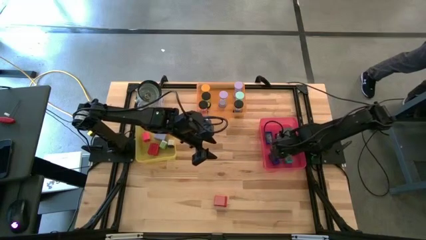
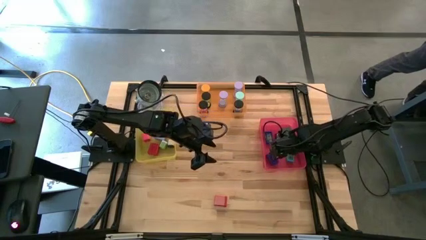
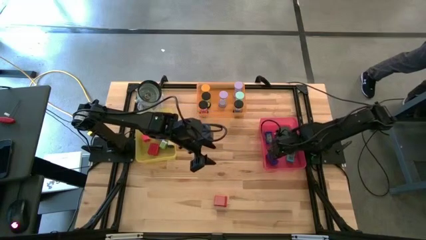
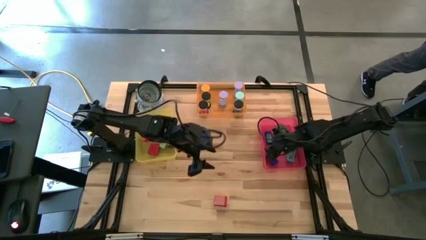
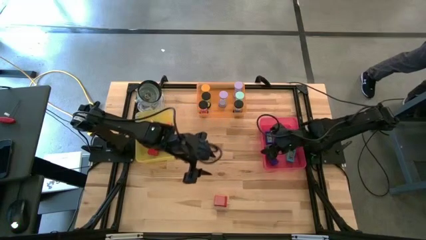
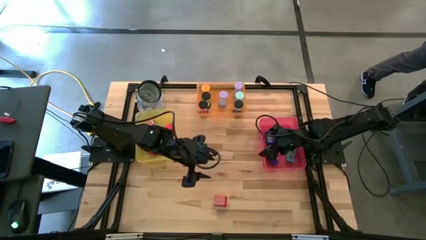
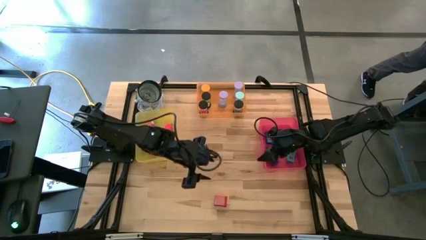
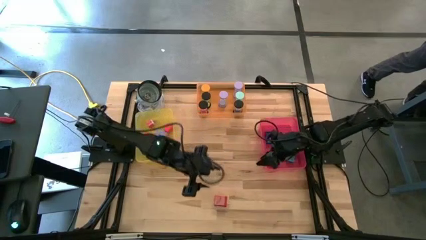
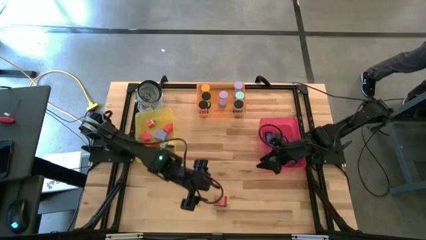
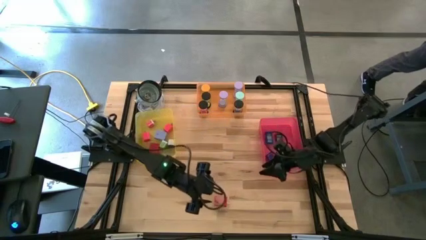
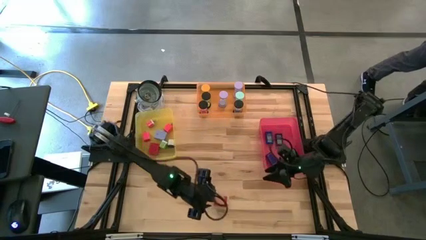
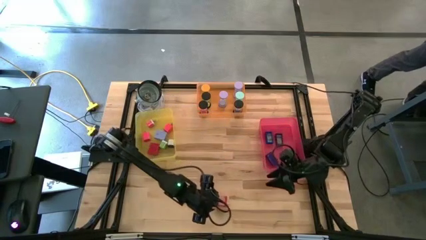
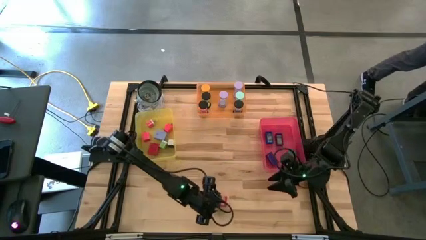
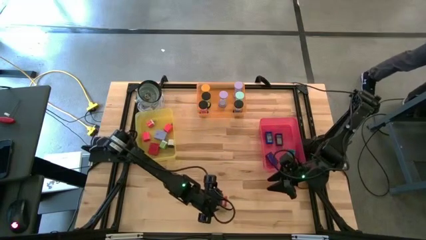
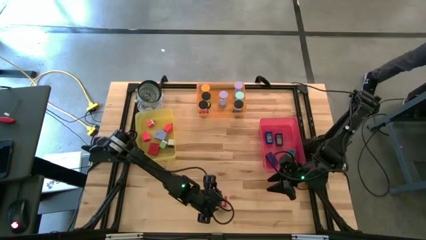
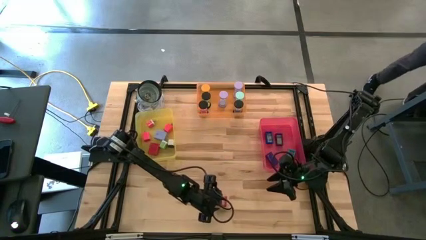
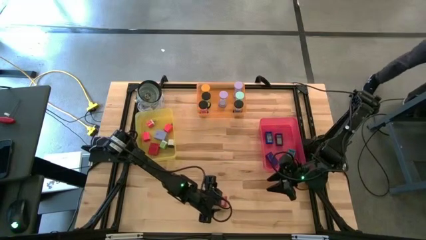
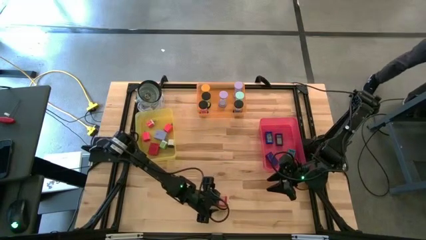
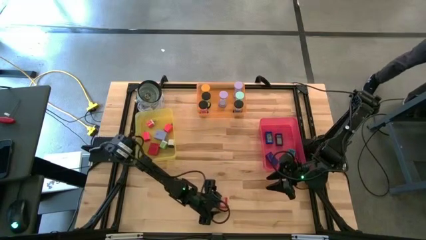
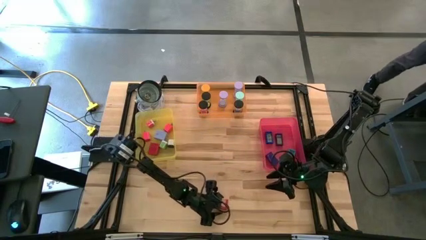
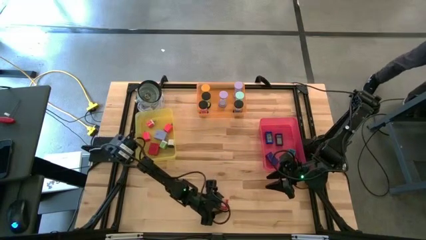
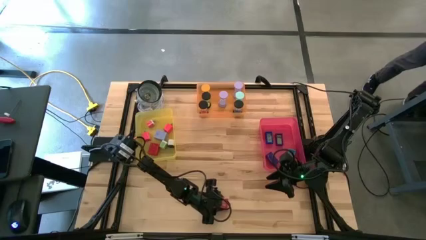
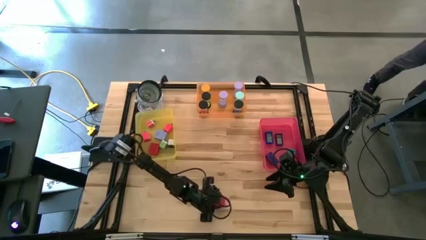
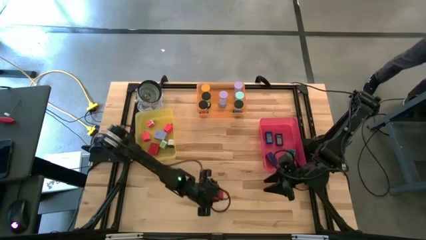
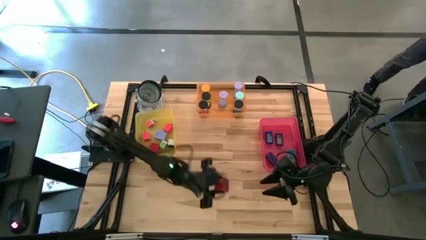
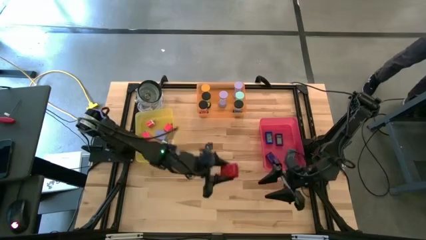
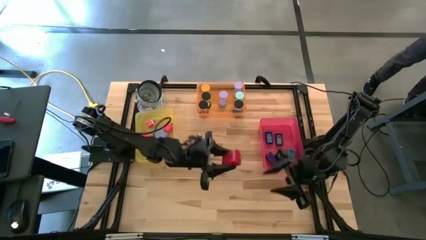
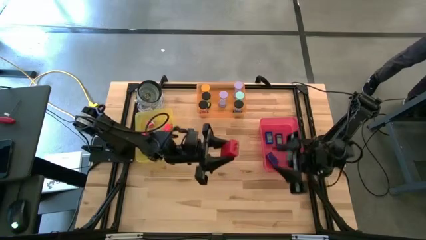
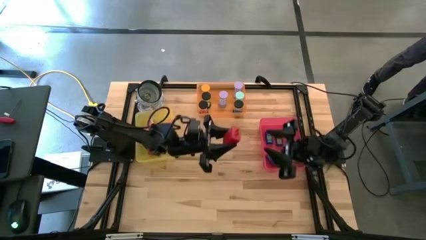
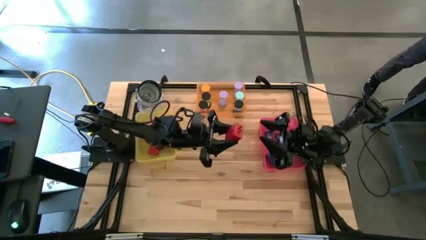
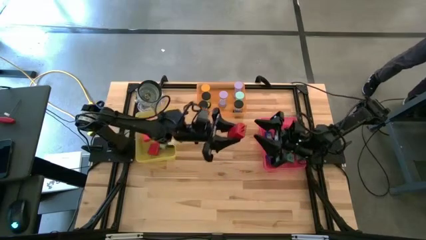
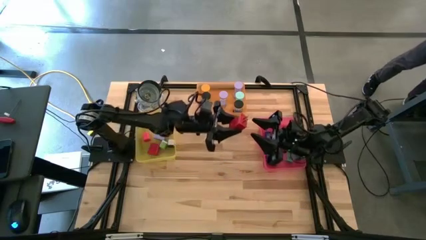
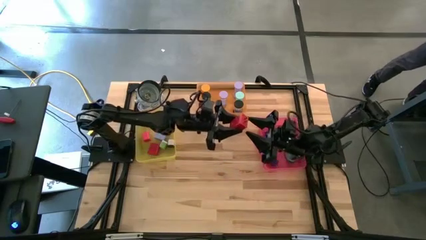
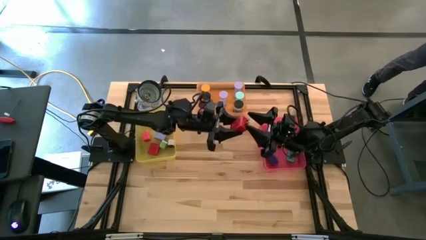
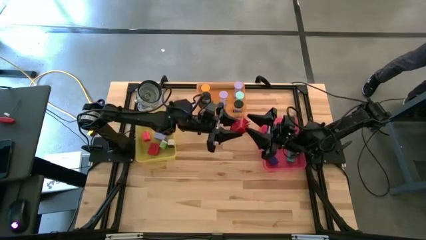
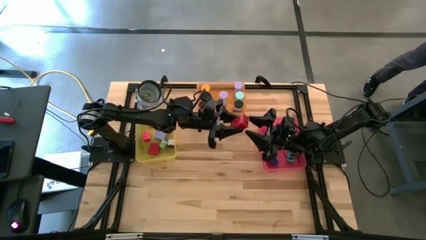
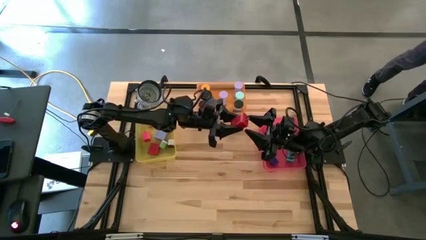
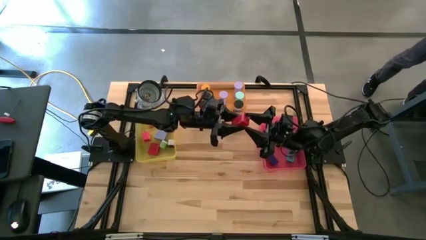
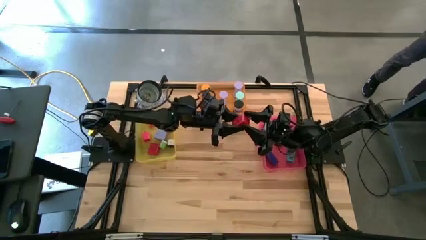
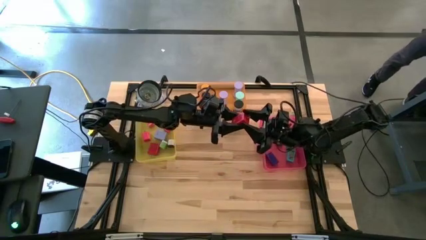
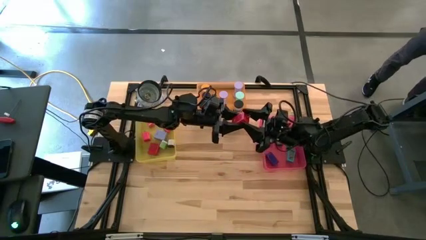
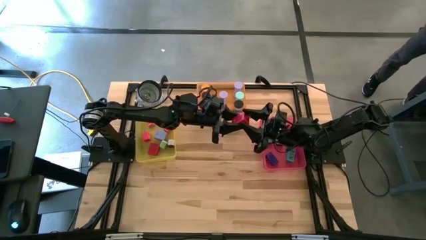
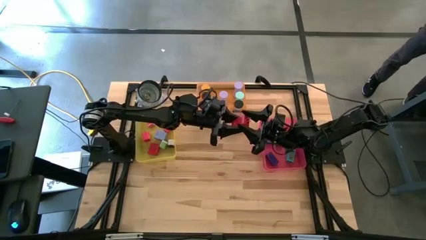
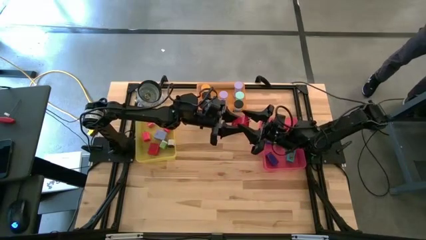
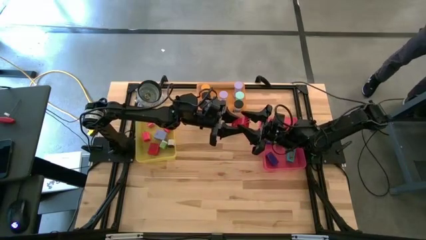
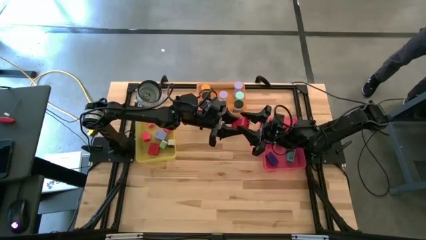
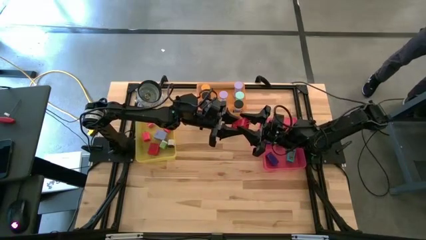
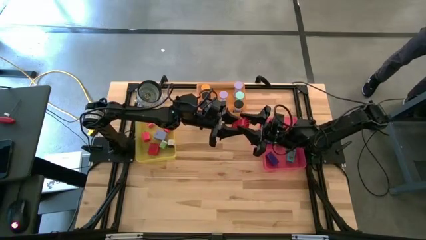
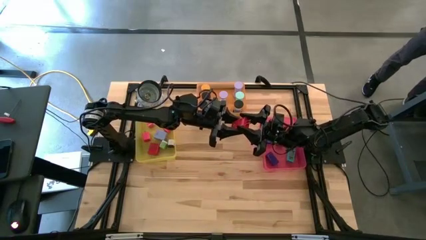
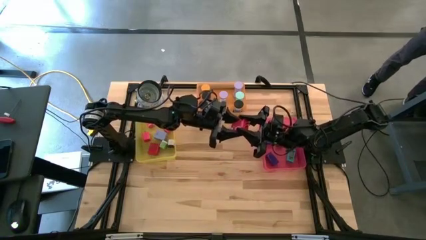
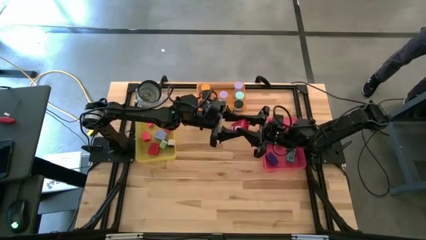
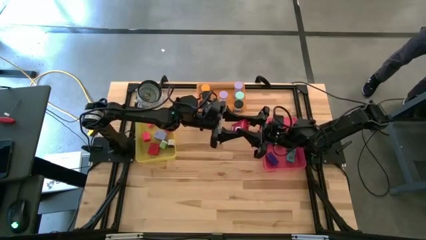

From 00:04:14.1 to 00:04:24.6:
Task: Pick & Place Office items
Put the red charger in the yellow bin

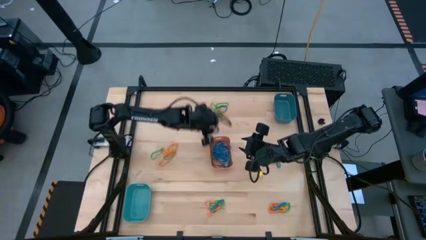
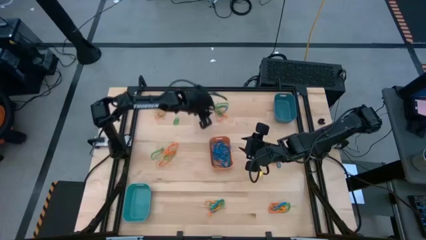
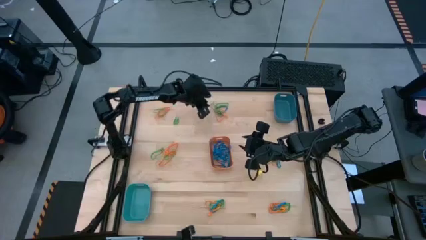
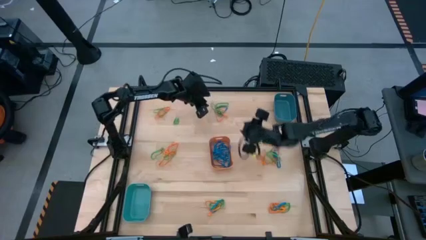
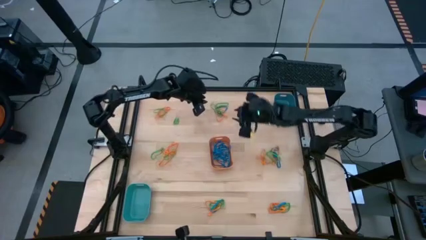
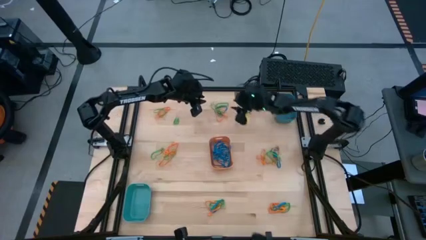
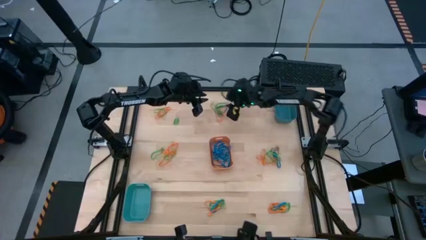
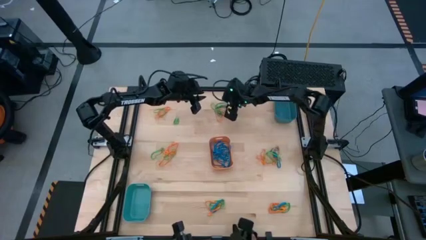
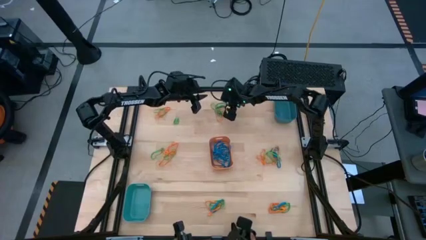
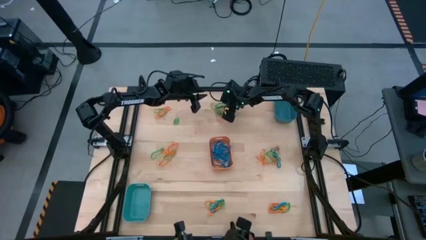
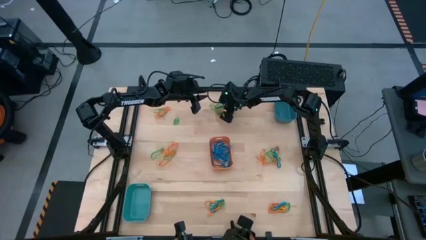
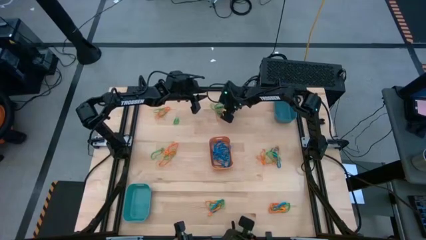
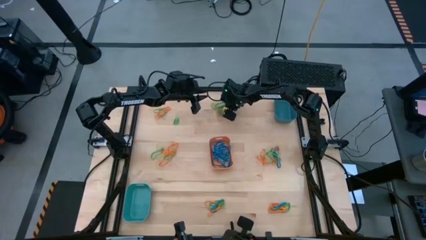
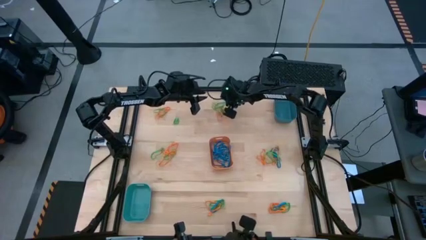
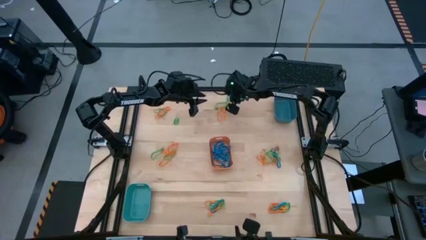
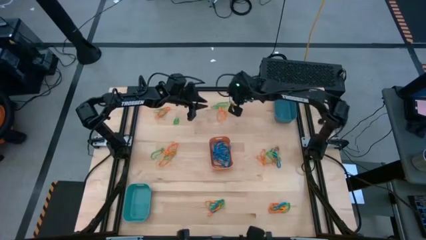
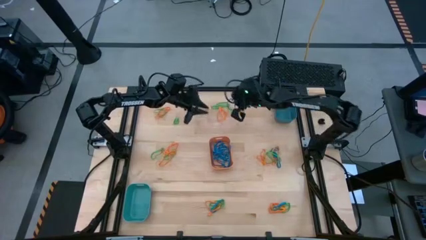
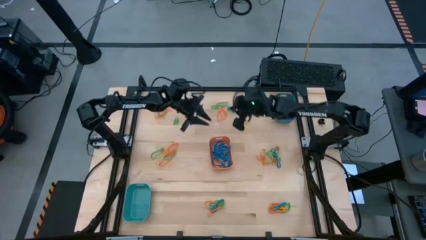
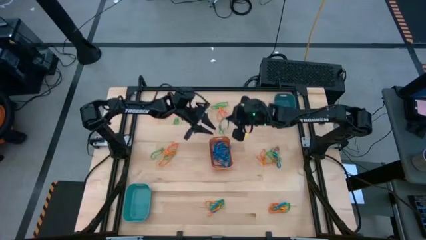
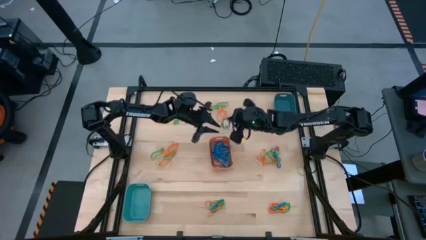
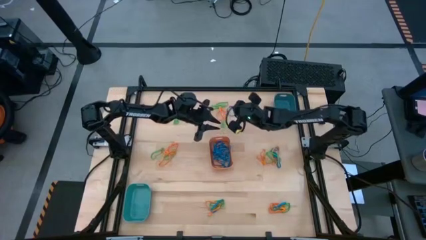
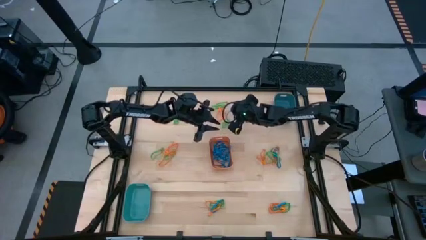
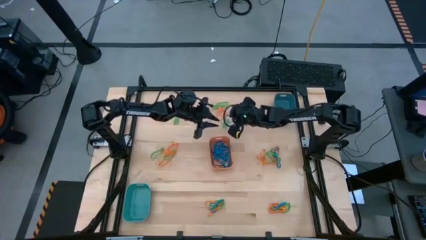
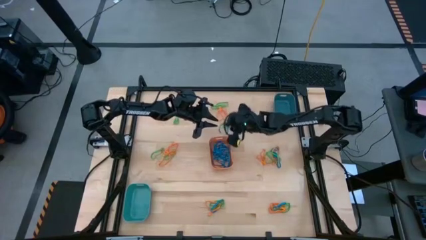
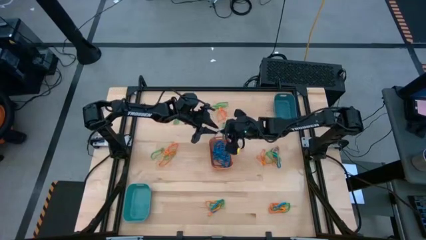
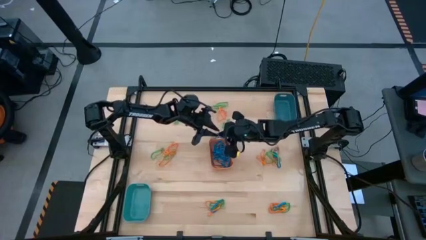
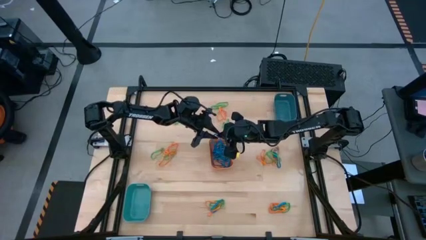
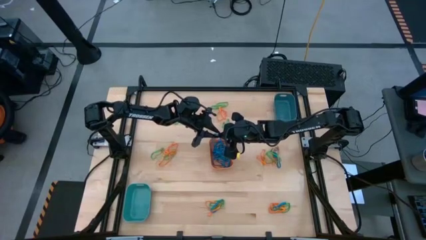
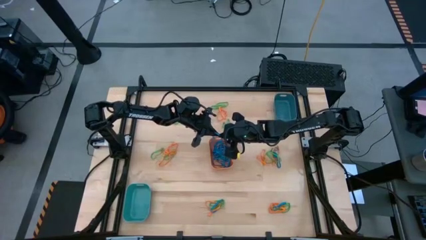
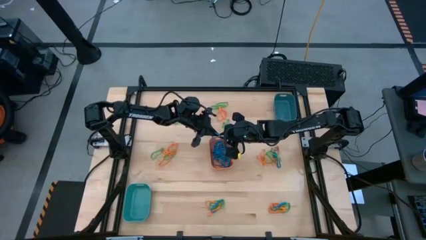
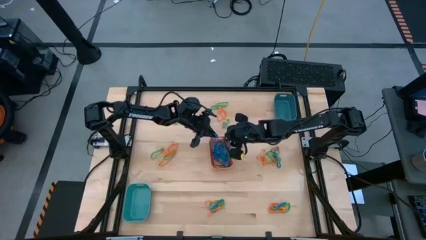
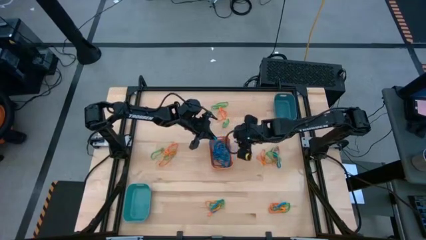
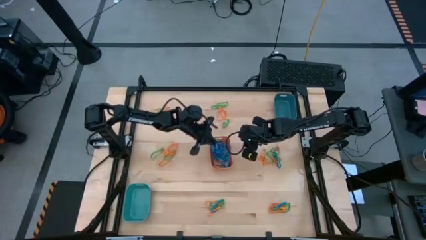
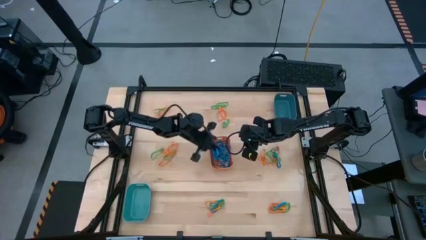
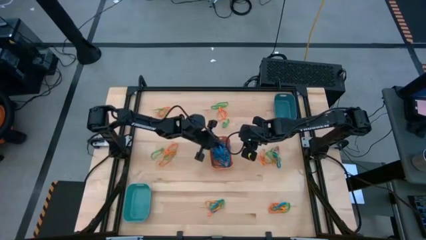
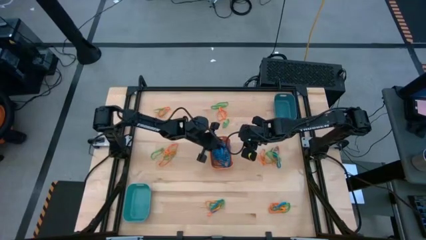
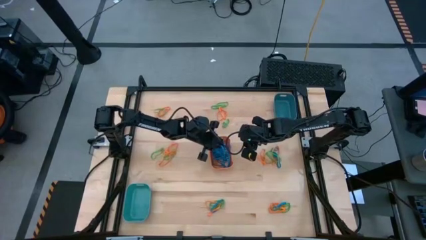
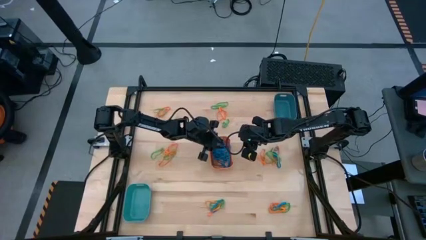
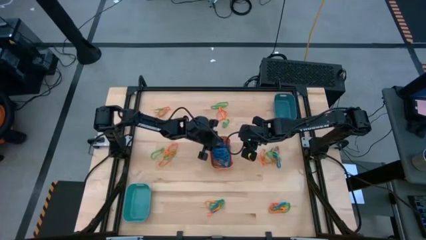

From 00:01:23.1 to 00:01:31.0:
Task: Sort rubber bands into baskets
Put the blue rubber band into the orange bin
